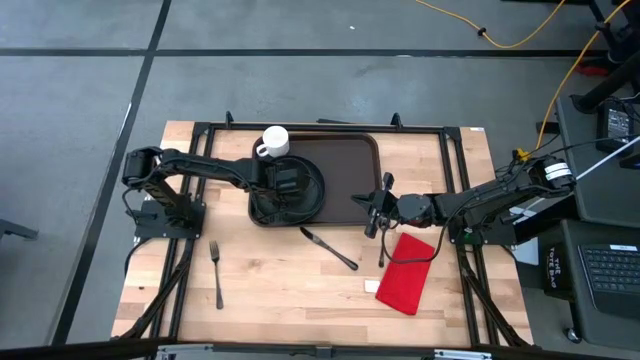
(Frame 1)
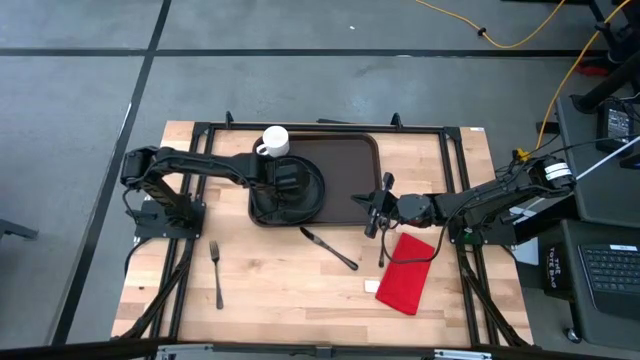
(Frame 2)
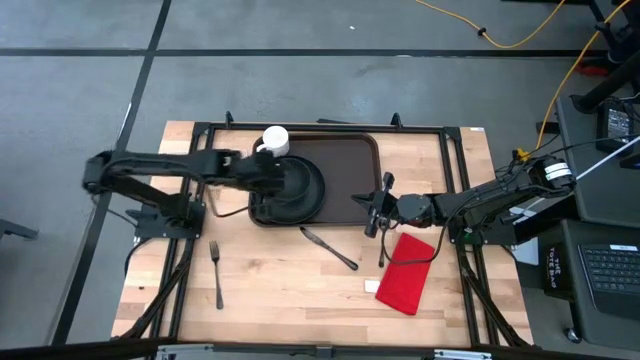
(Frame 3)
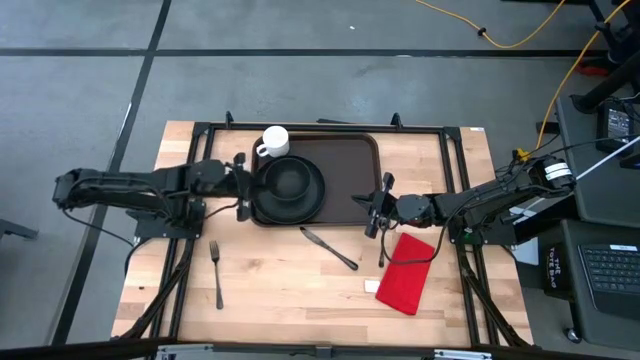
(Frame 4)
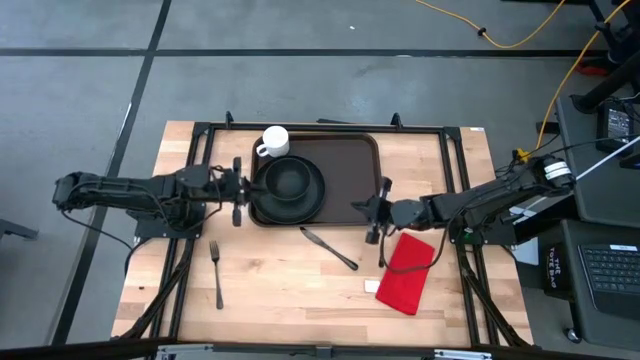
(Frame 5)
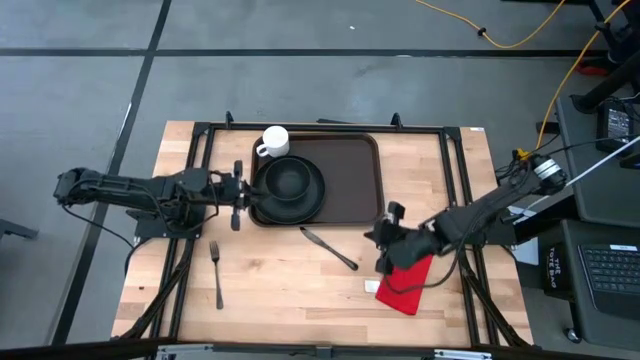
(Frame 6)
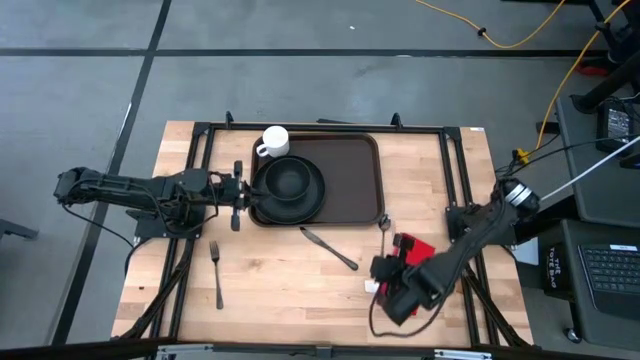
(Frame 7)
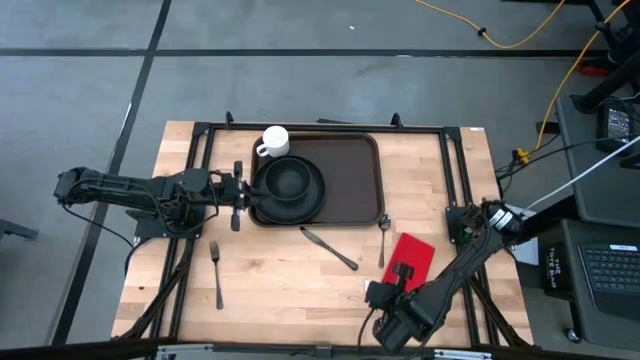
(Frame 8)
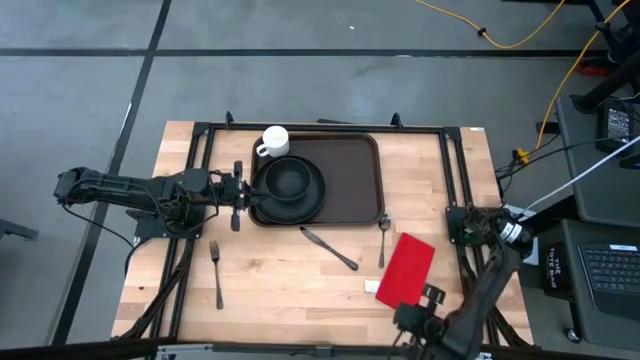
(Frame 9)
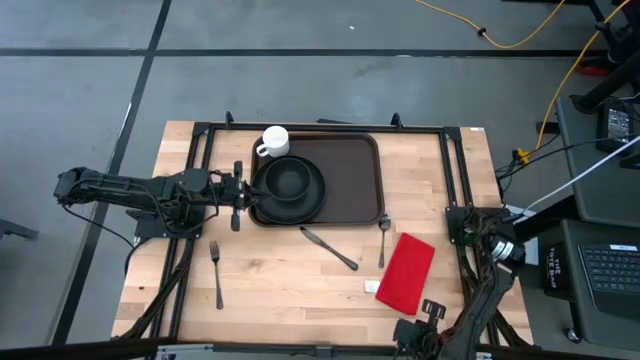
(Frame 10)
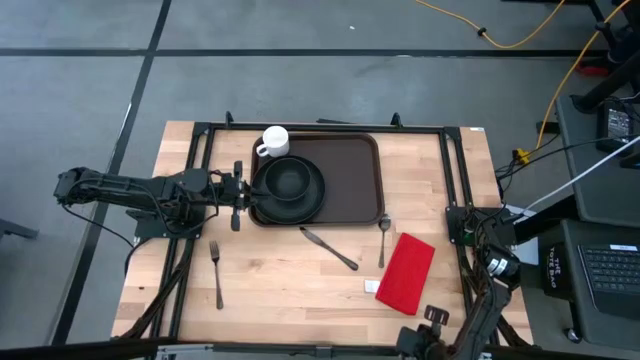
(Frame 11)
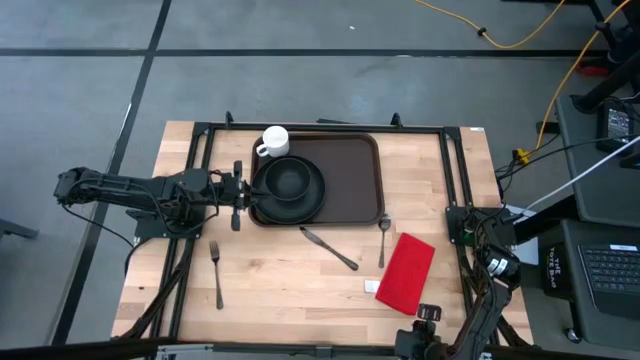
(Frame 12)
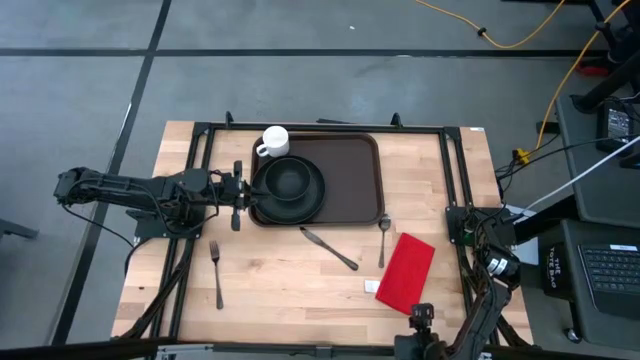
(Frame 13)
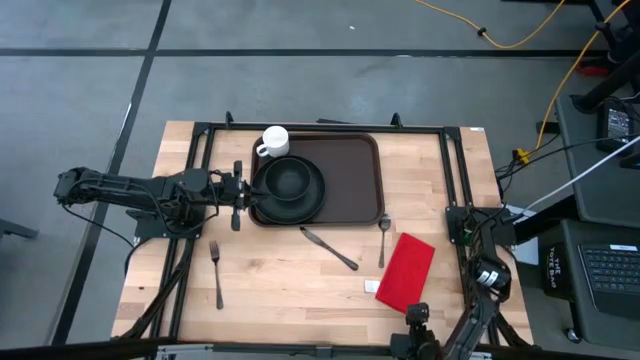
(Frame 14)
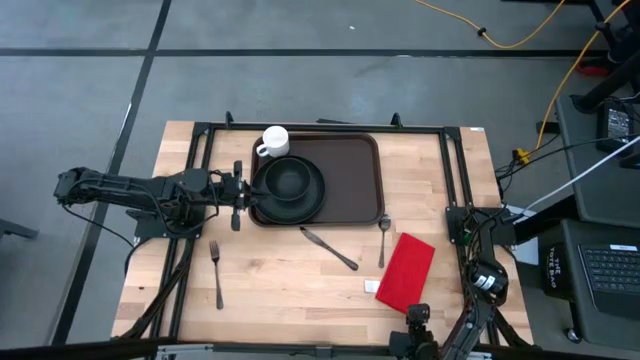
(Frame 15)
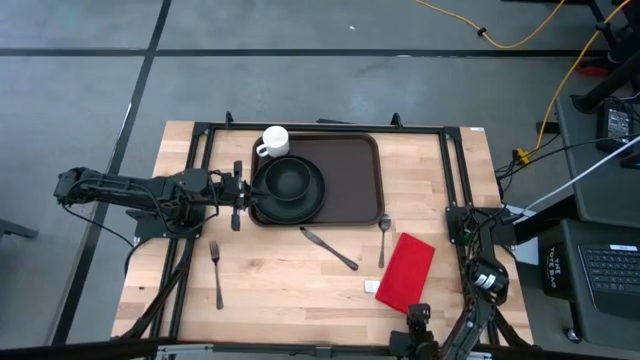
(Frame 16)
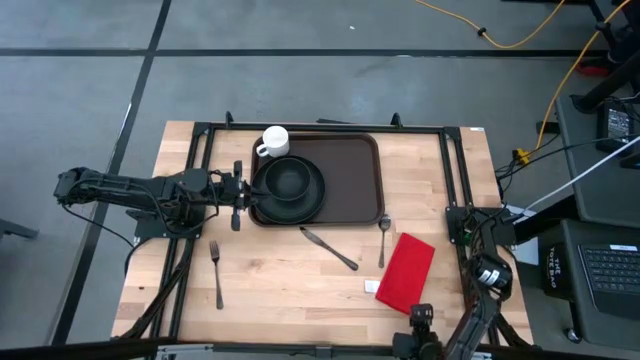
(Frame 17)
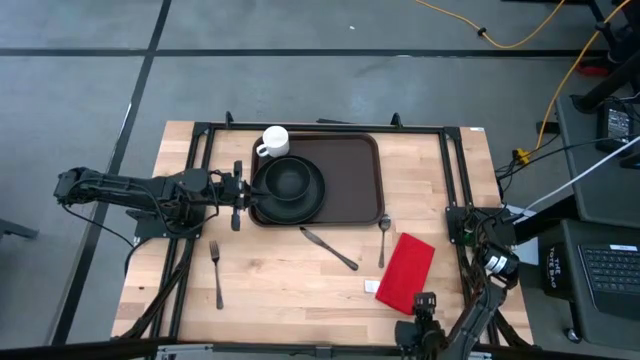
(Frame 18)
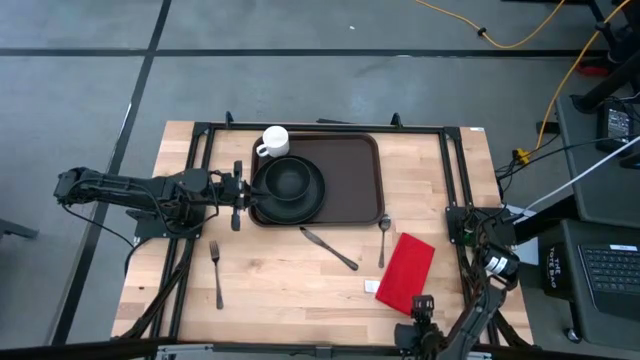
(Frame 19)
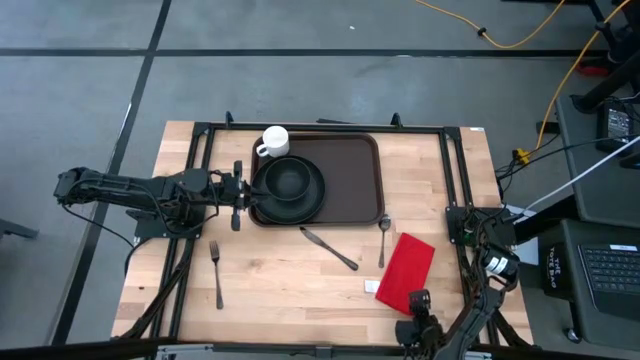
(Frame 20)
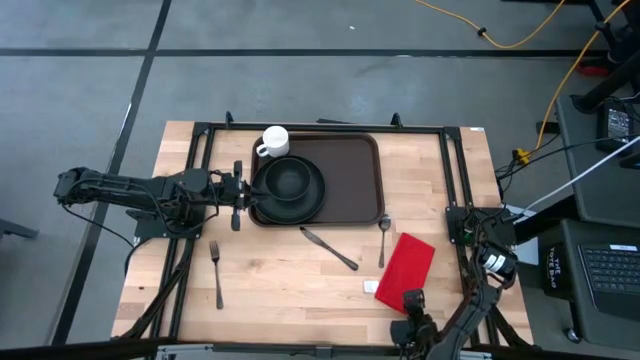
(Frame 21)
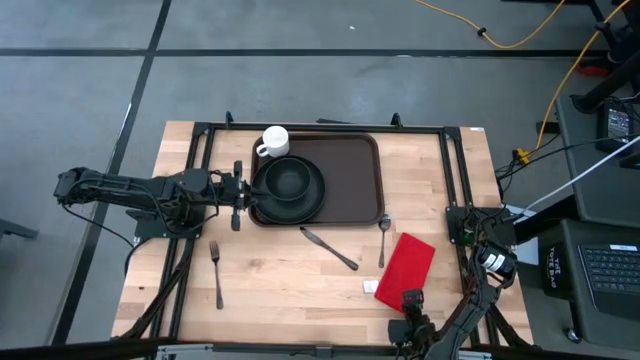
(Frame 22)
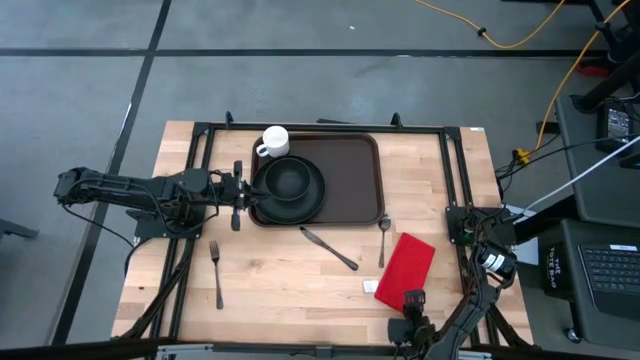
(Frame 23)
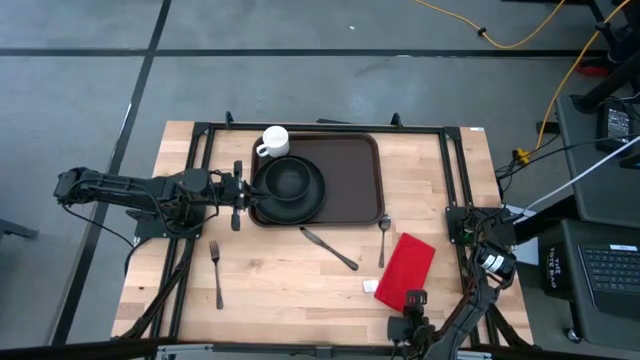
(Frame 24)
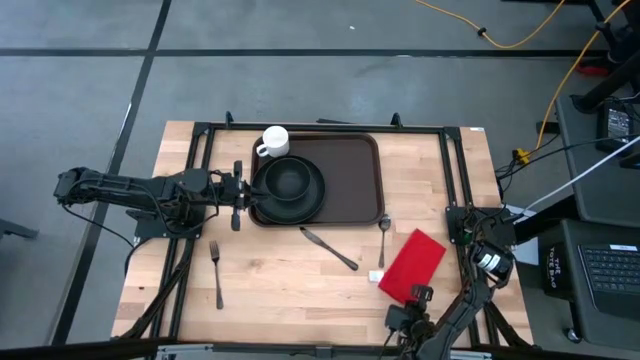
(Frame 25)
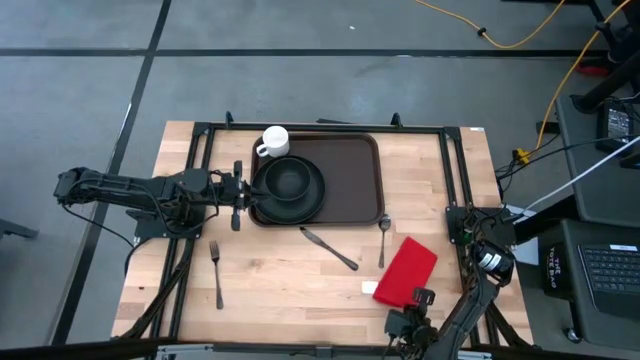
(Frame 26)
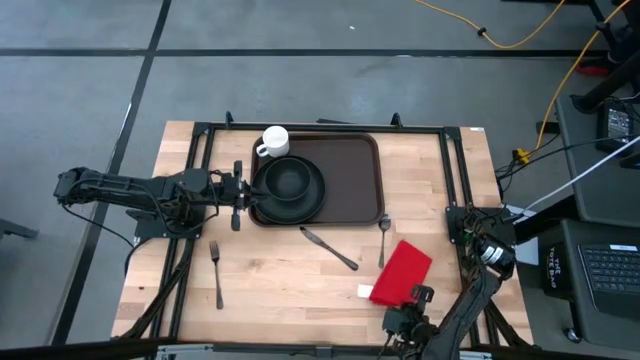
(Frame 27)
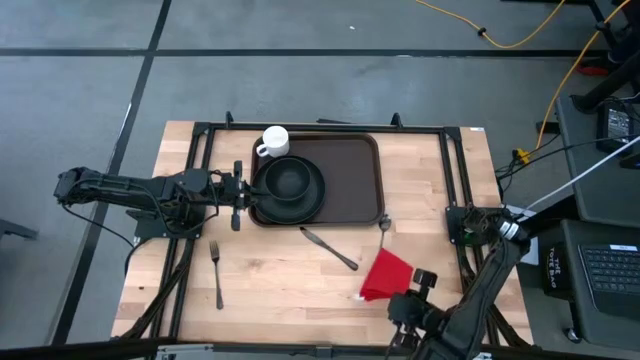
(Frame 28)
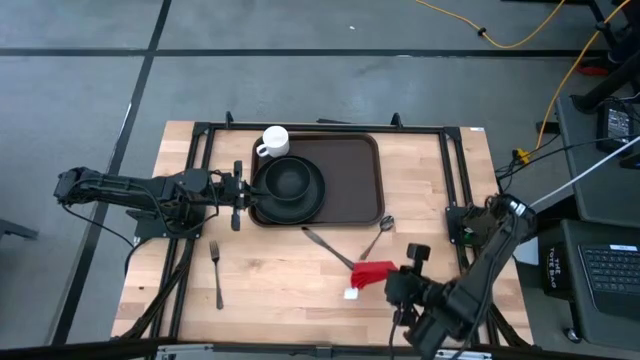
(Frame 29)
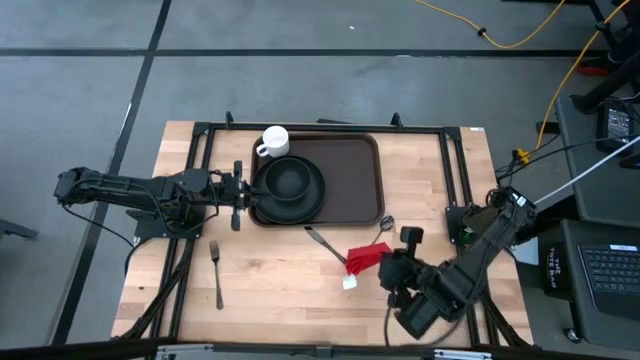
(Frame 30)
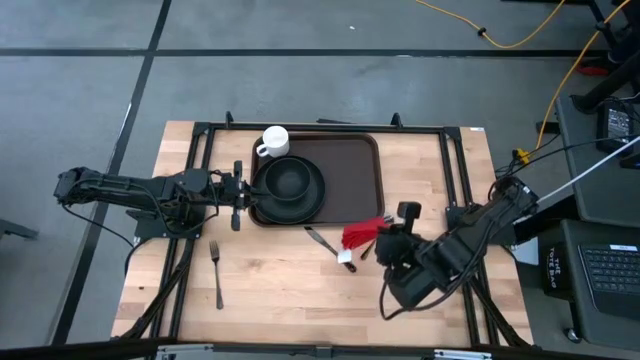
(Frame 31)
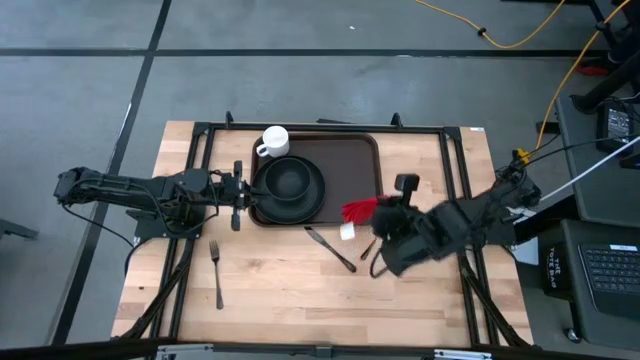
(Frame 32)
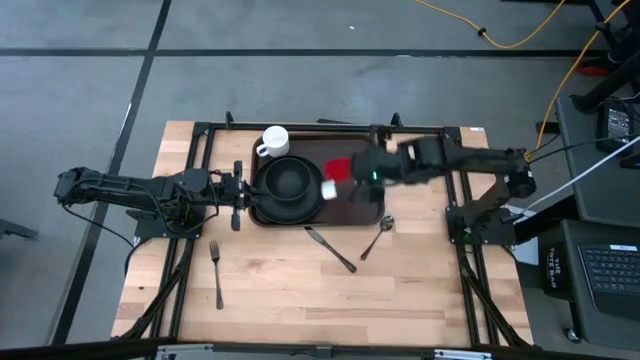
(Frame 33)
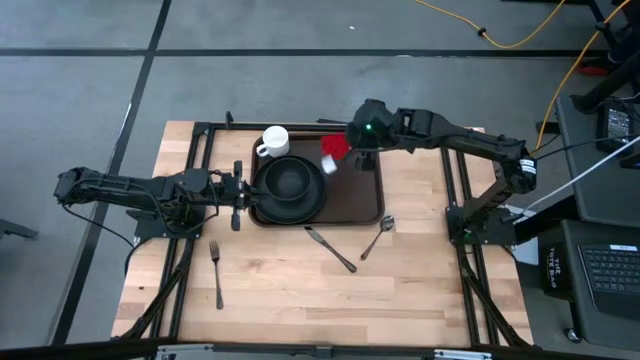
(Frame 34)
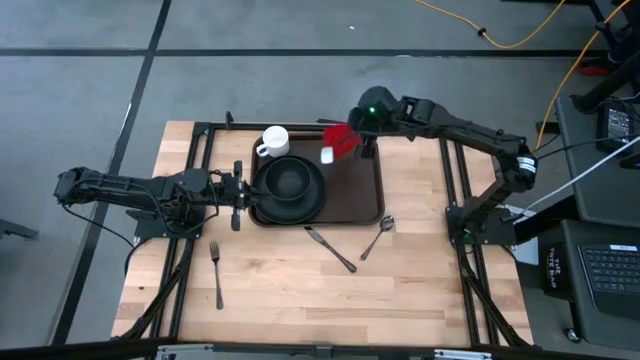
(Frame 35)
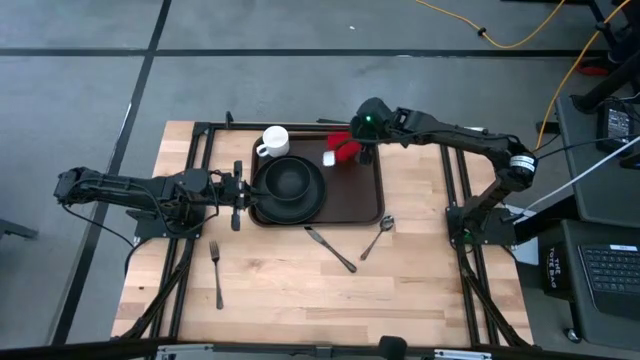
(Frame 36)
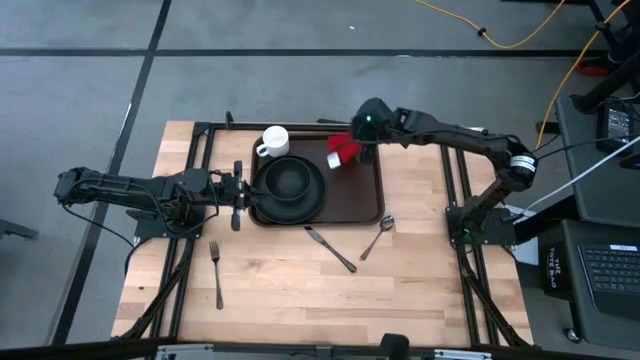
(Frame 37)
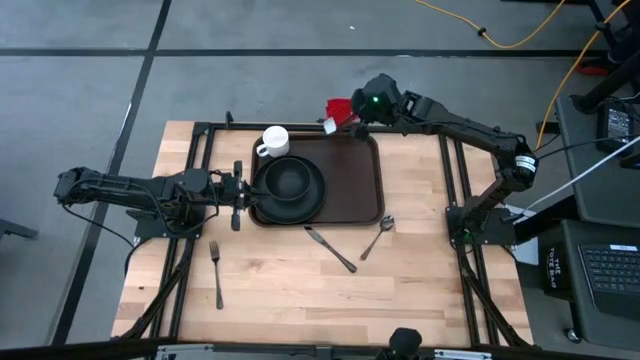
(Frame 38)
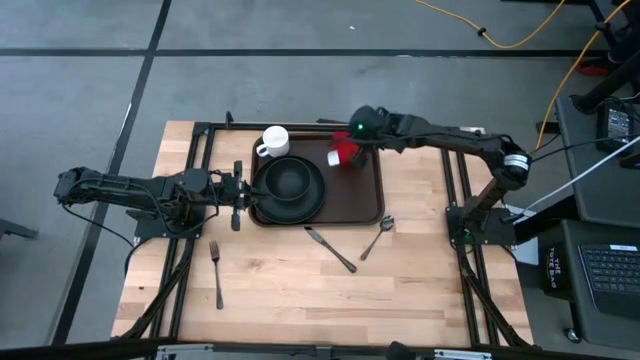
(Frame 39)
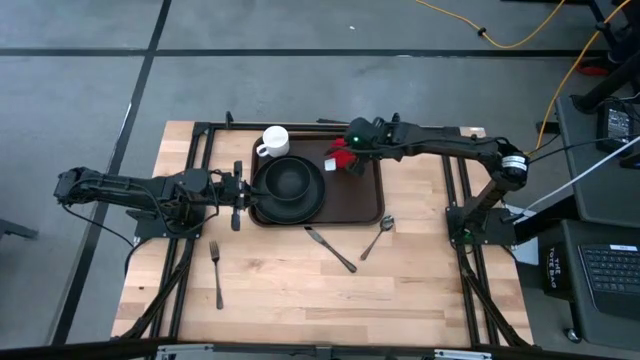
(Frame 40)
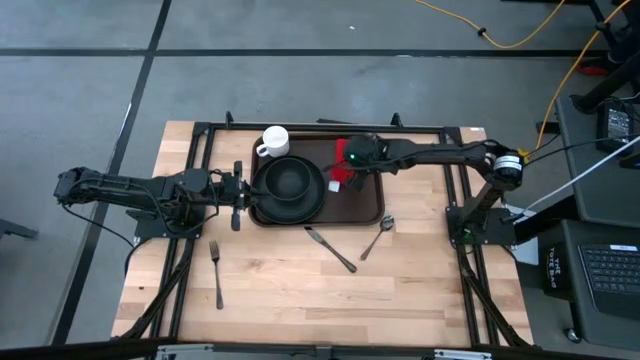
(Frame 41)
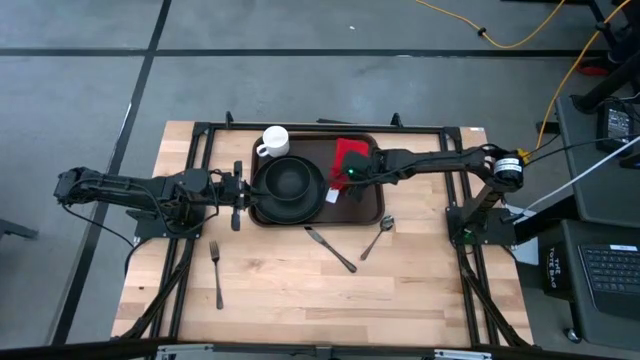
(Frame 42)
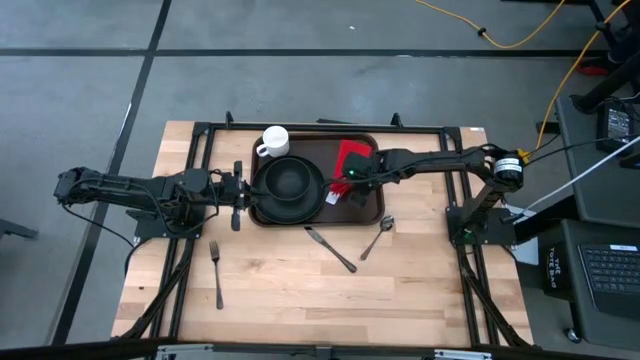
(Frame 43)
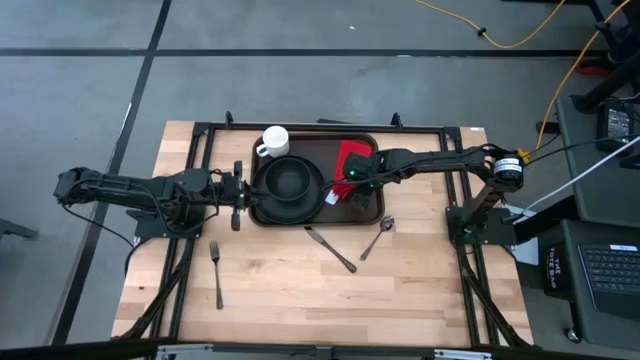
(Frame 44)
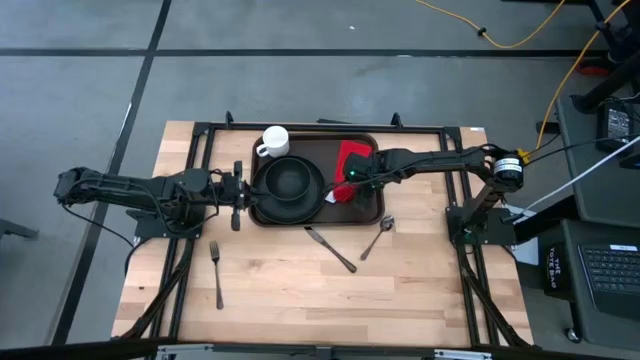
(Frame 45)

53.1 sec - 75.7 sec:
Task: Set up tray
Put the red table napkin beside the black plate on the brown serving tray
